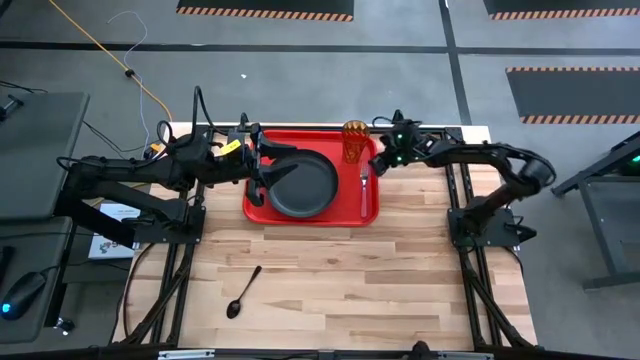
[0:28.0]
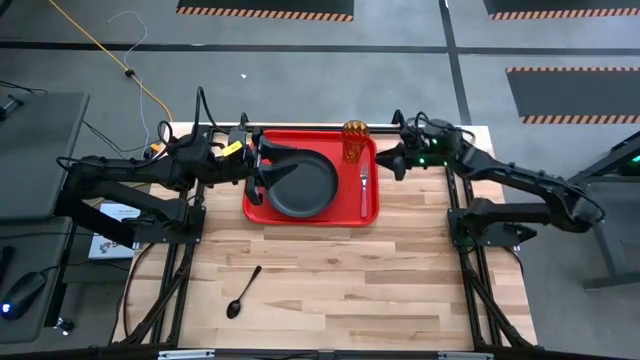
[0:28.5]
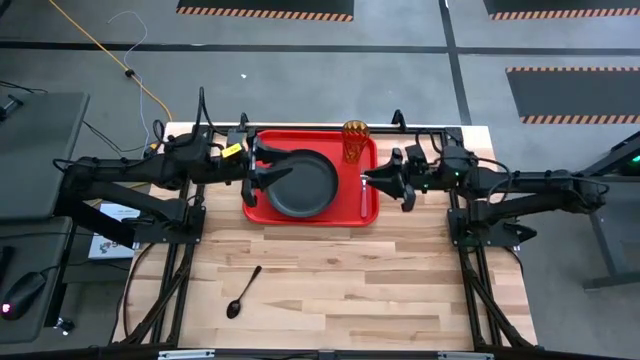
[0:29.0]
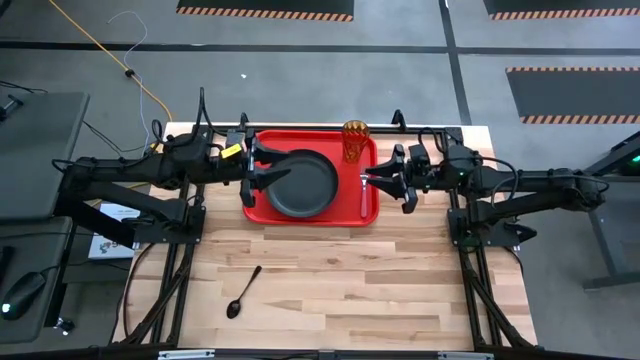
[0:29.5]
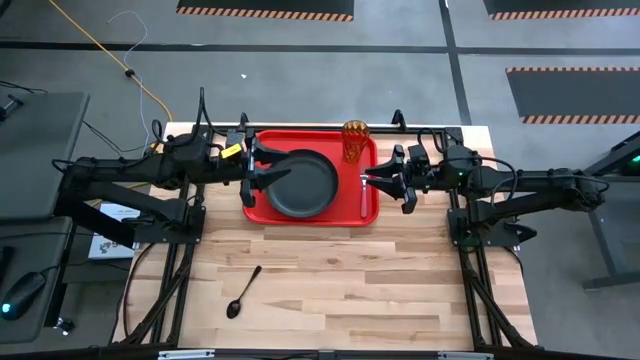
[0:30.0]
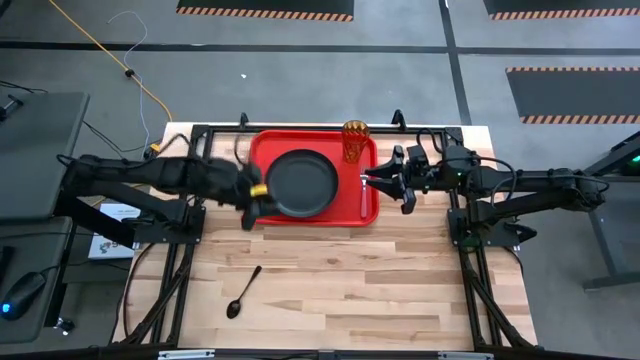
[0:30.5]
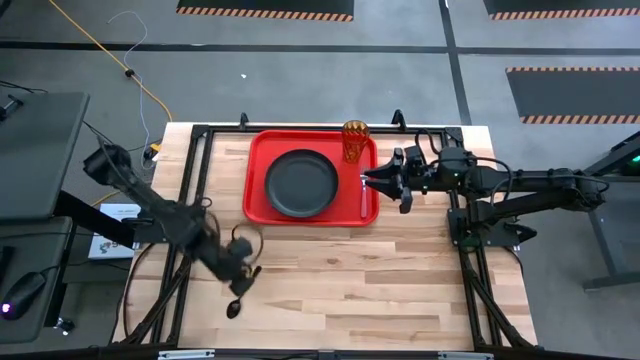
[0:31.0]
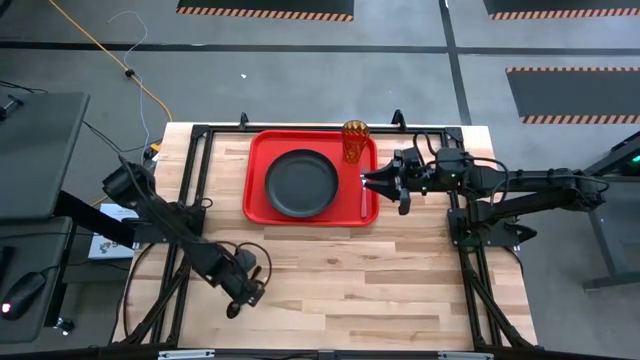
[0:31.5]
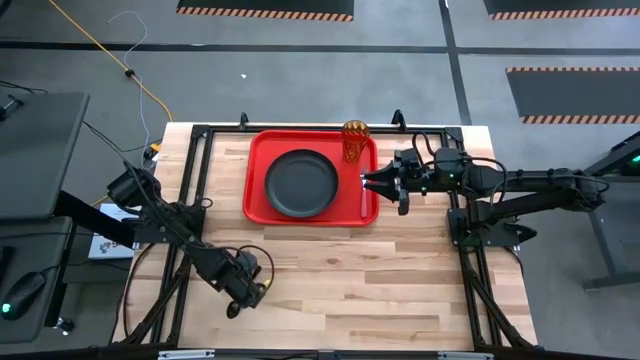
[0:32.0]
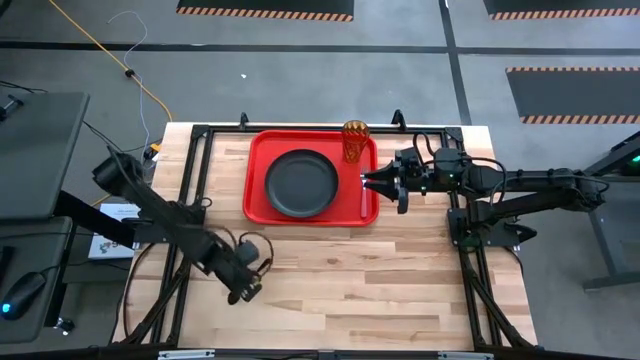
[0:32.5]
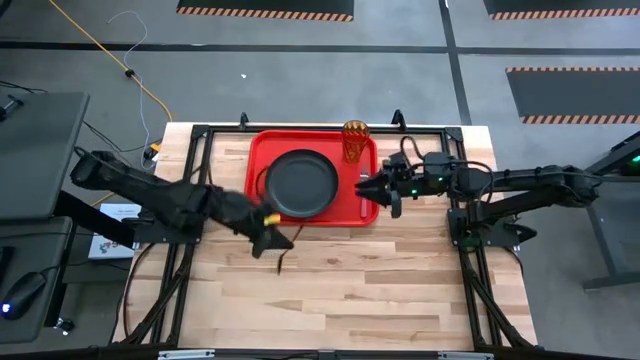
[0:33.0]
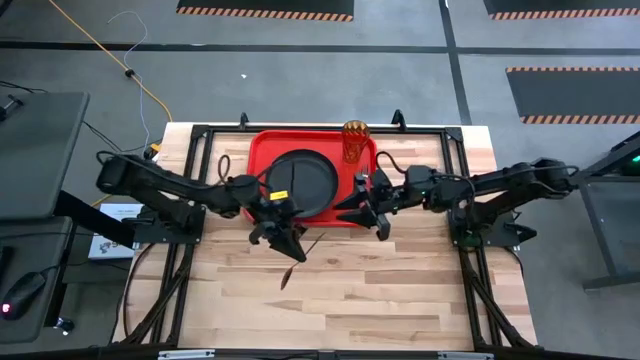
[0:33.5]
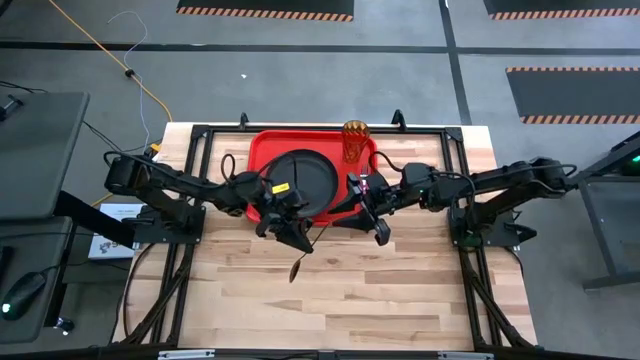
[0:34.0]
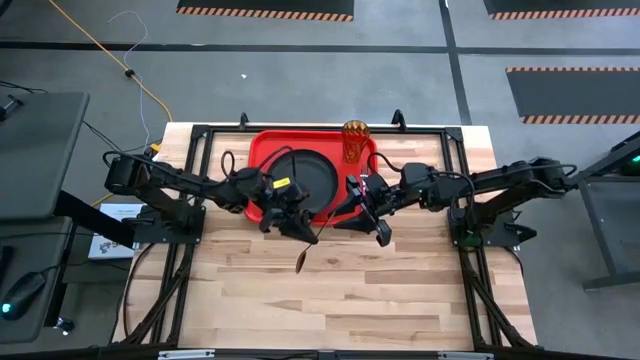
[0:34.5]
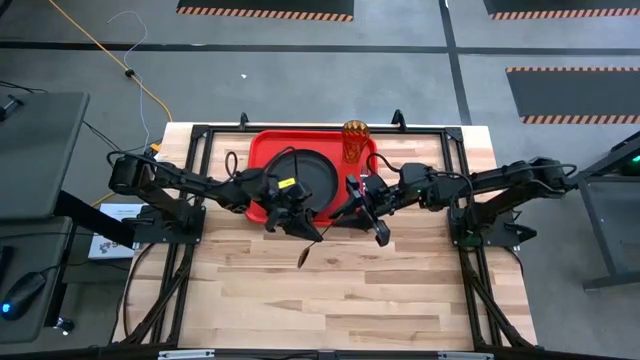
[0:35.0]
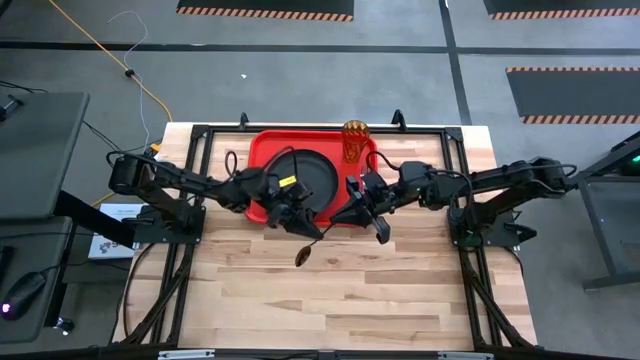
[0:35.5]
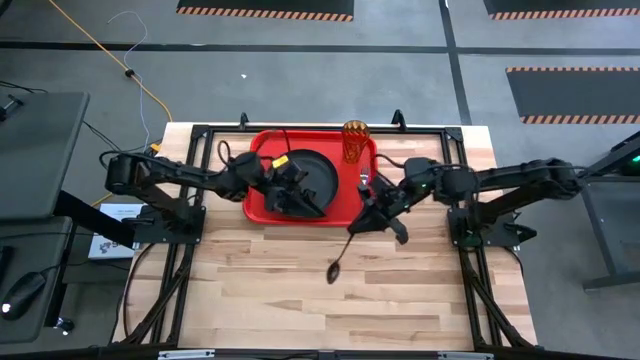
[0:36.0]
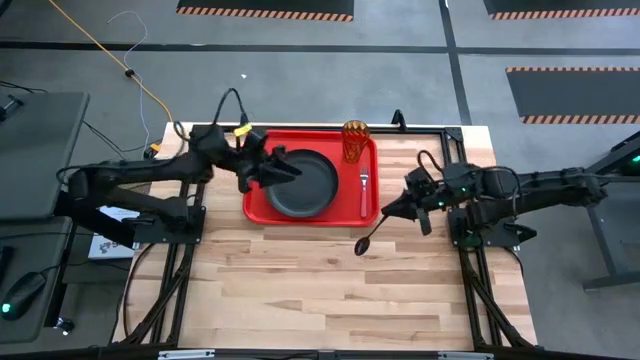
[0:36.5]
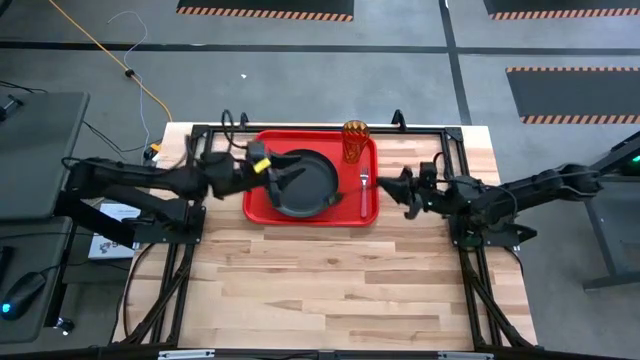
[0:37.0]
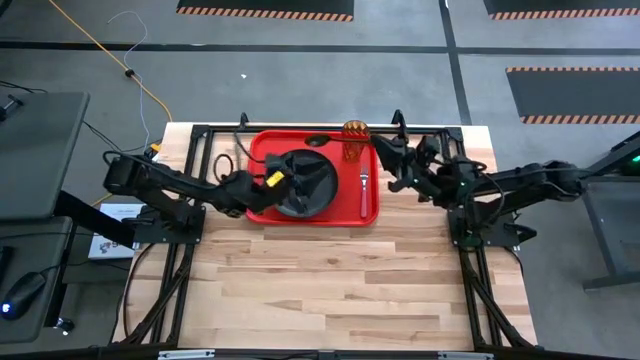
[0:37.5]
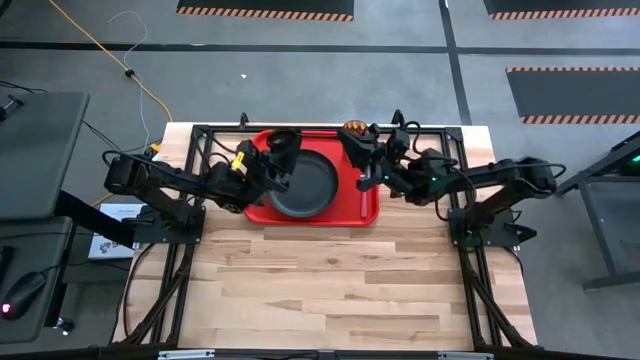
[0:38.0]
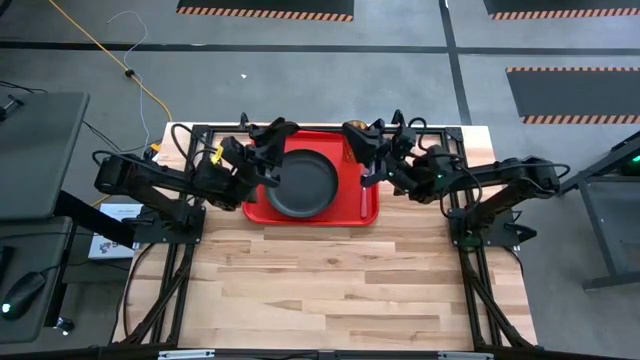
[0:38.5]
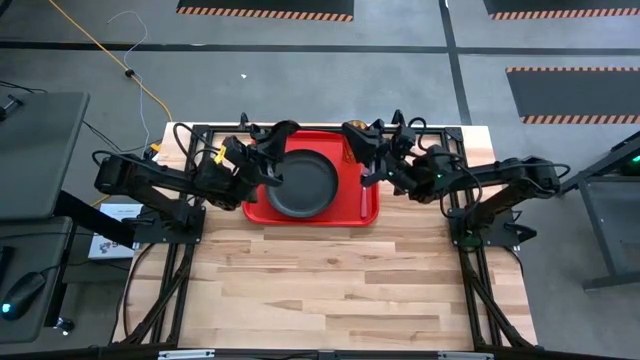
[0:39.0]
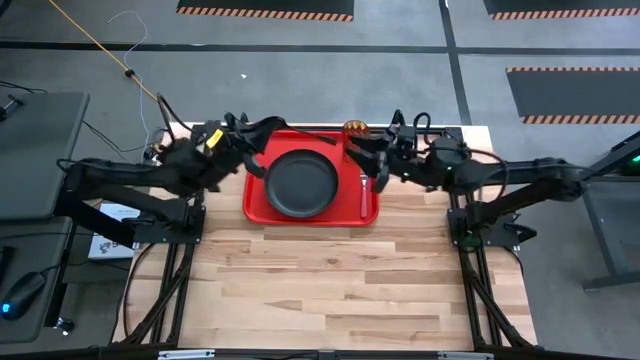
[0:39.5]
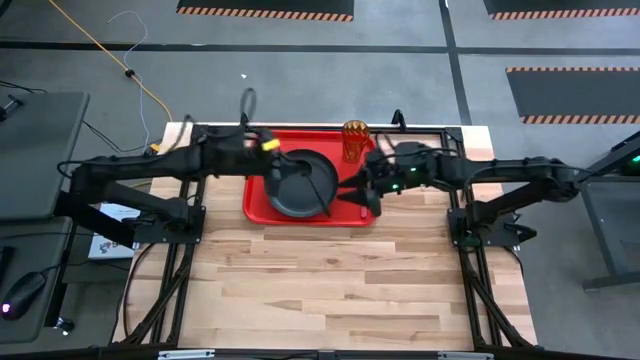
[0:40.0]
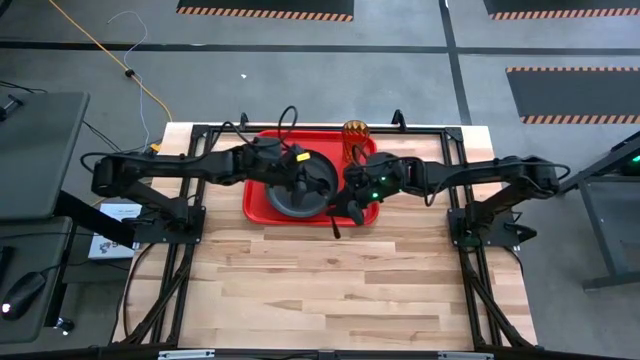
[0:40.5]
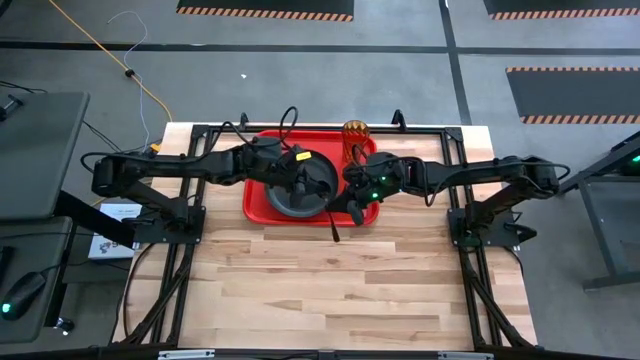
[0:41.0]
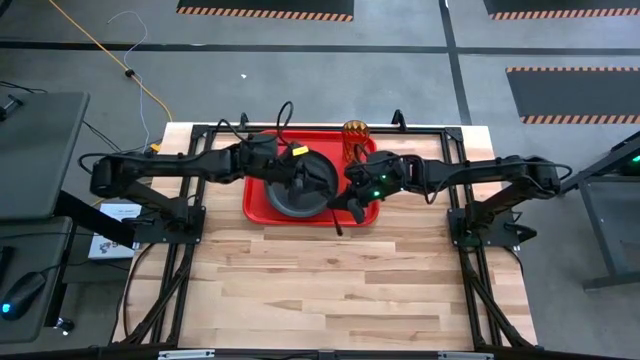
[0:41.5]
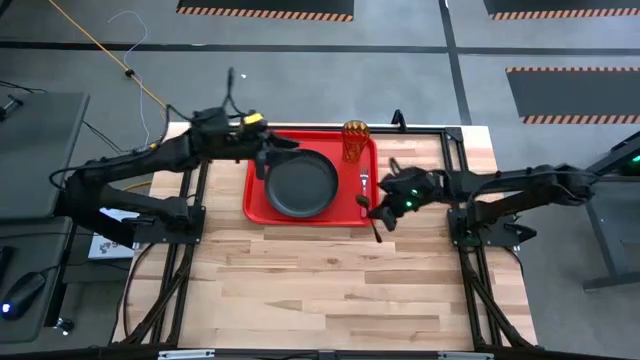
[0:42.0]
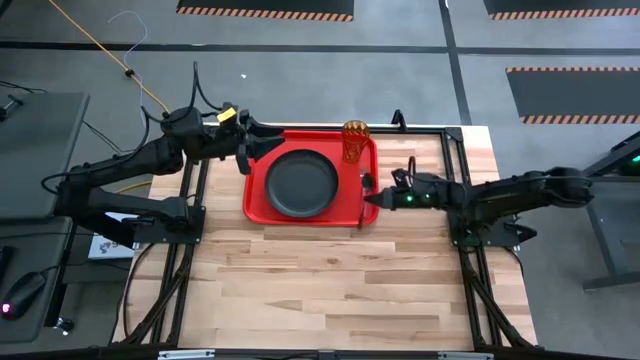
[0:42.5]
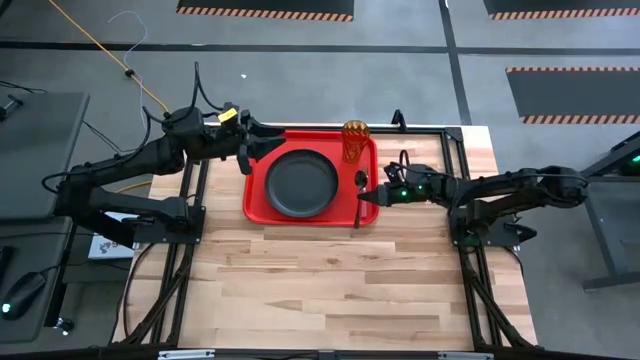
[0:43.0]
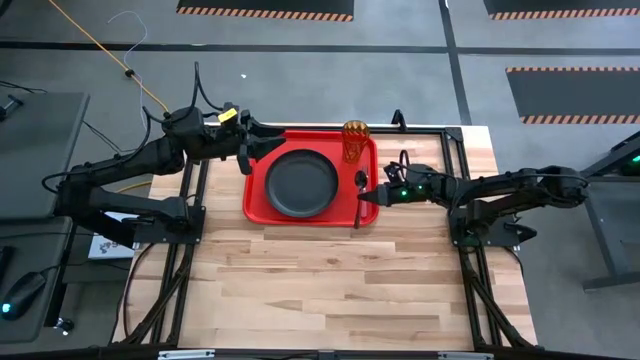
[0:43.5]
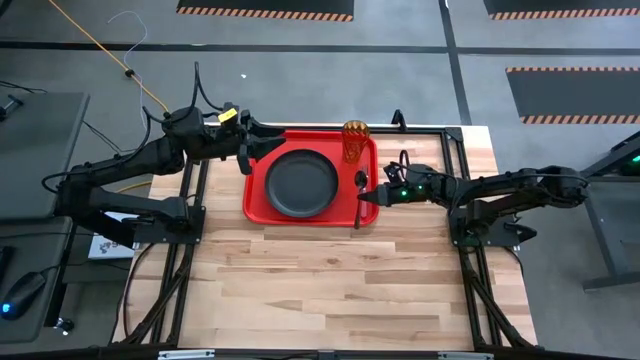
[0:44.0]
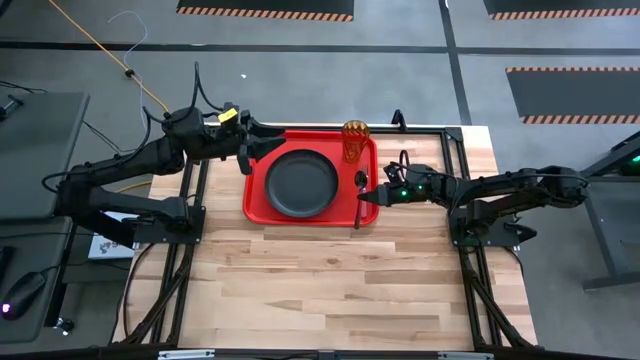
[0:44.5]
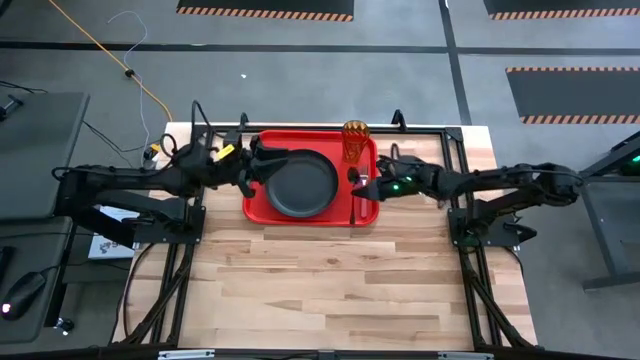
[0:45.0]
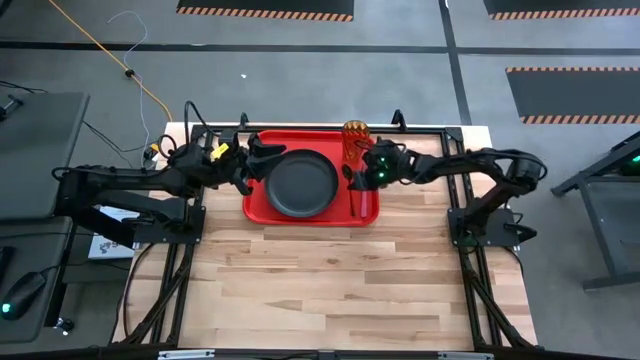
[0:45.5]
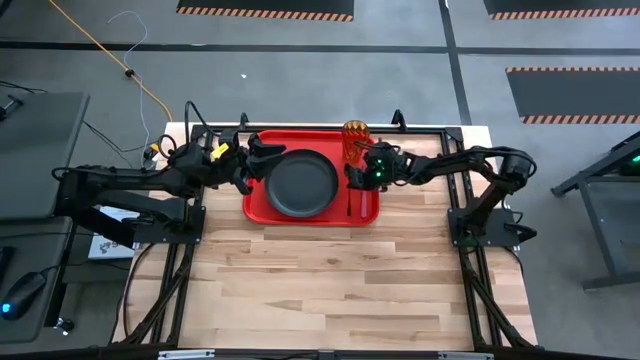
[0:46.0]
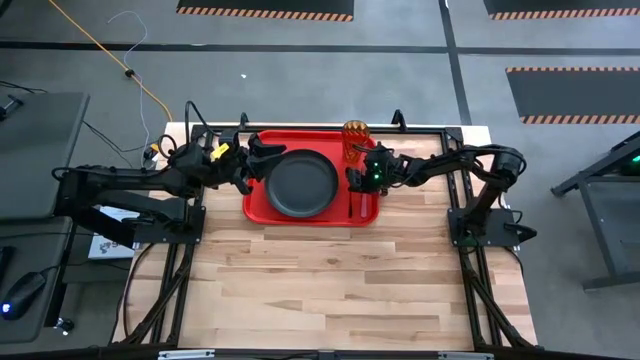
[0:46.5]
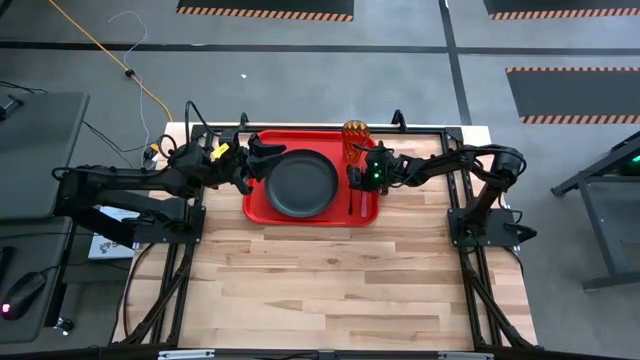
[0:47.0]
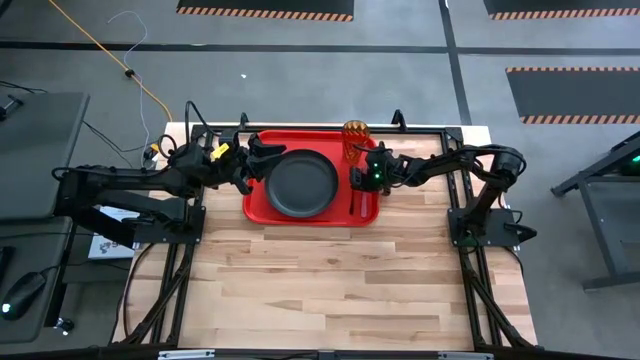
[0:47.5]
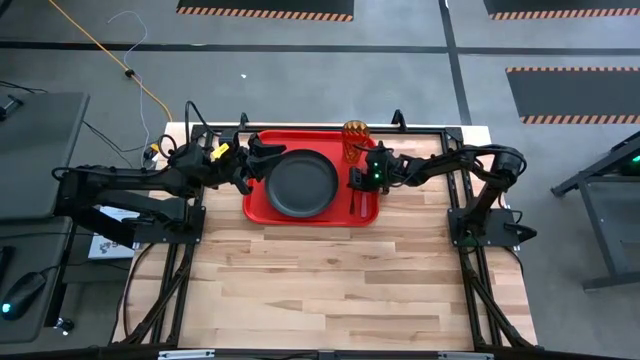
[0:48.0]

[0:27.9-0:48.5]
Task: Pick and place plate/cup/fork/spoon on tray
Put the black spoon on the red serving tray to right of the black plate
